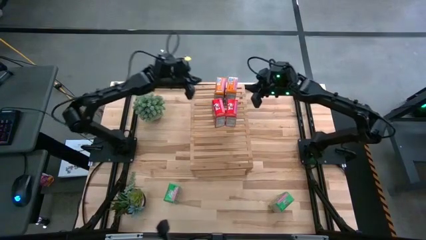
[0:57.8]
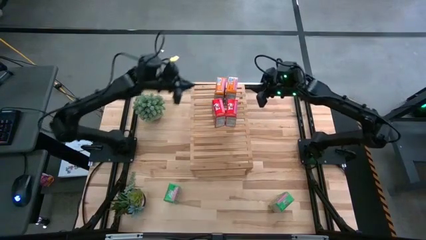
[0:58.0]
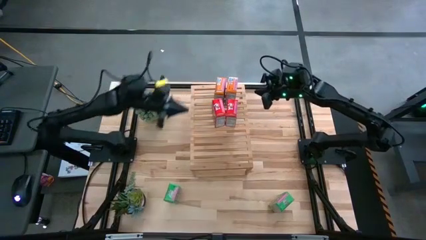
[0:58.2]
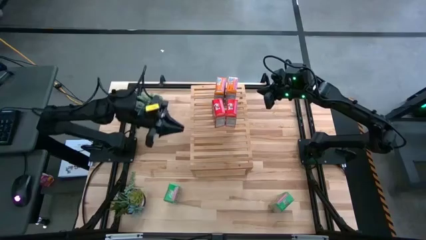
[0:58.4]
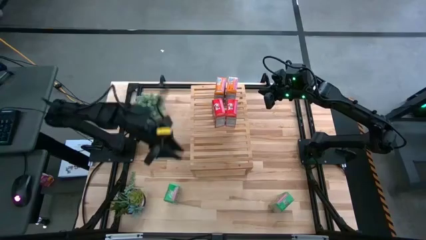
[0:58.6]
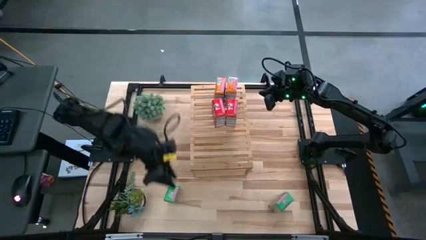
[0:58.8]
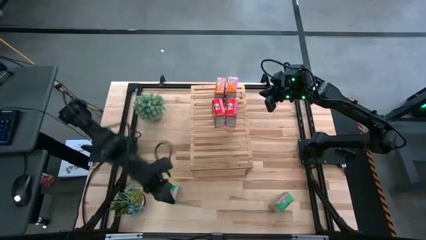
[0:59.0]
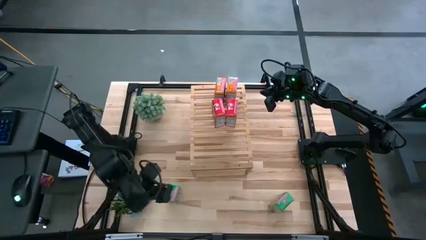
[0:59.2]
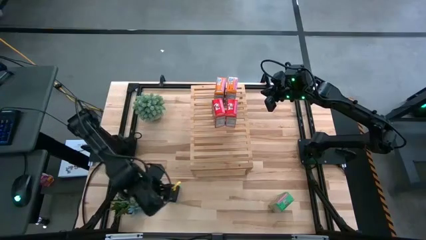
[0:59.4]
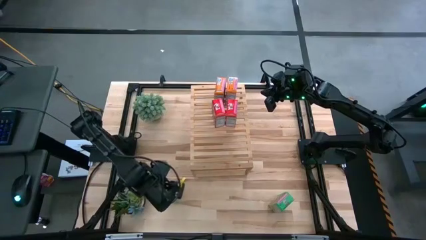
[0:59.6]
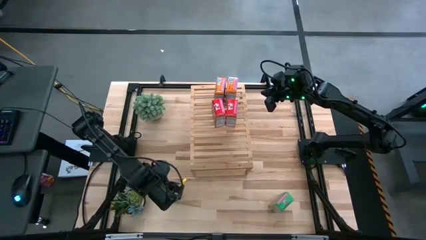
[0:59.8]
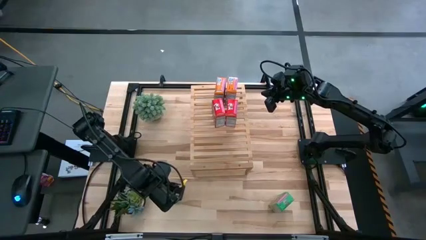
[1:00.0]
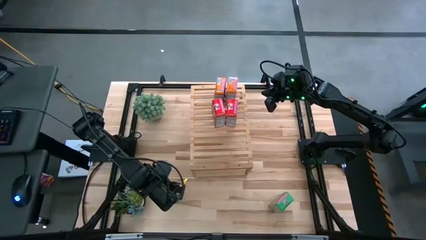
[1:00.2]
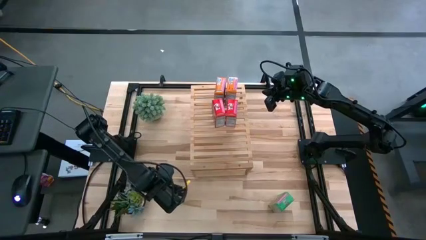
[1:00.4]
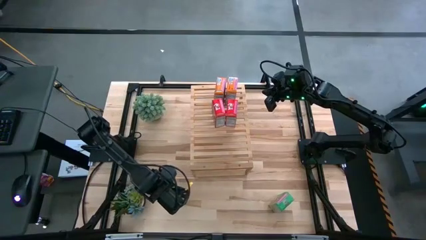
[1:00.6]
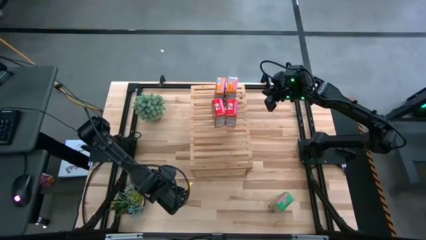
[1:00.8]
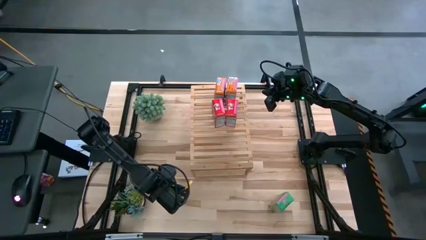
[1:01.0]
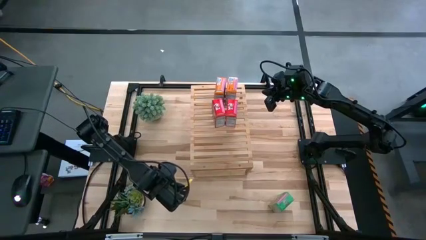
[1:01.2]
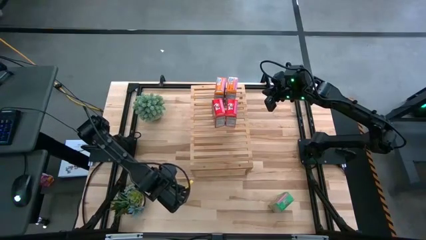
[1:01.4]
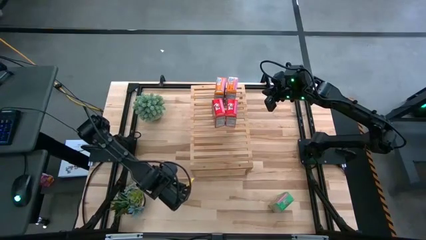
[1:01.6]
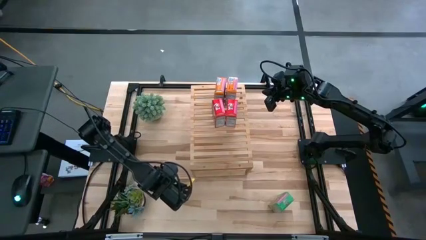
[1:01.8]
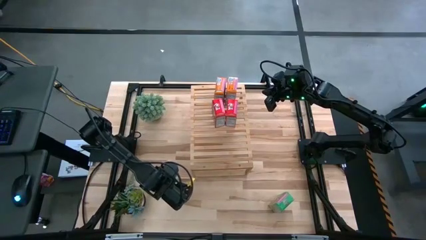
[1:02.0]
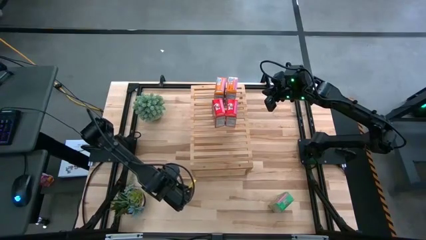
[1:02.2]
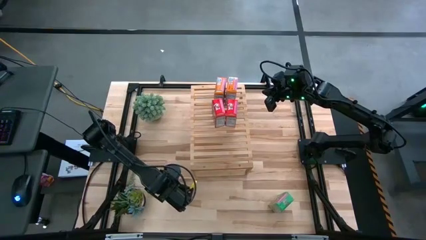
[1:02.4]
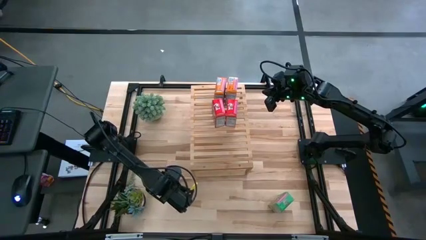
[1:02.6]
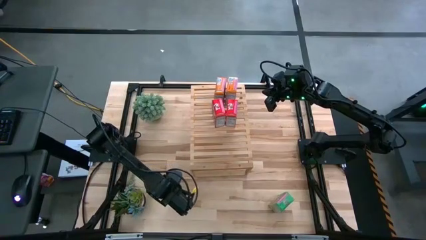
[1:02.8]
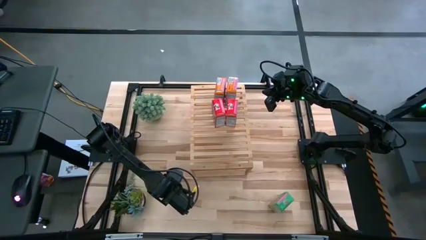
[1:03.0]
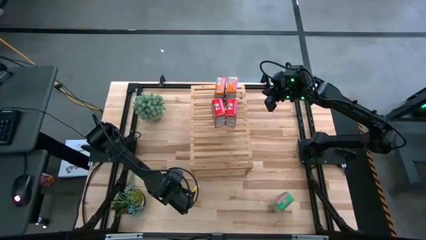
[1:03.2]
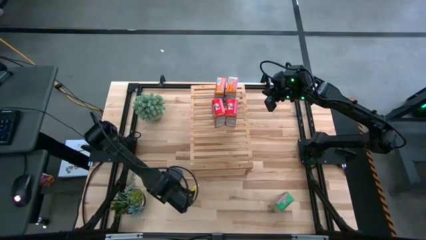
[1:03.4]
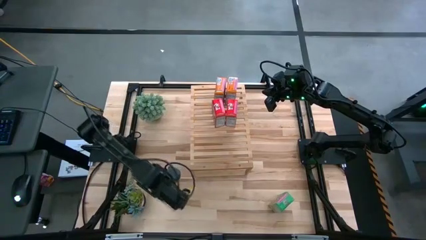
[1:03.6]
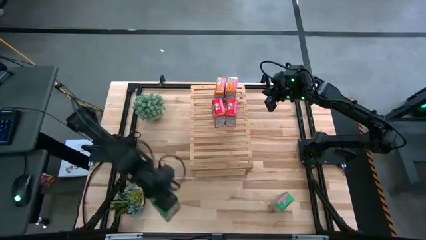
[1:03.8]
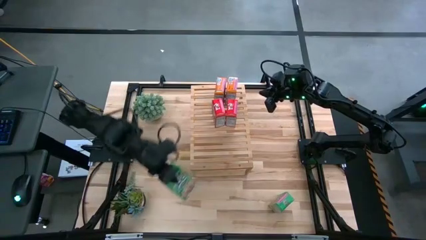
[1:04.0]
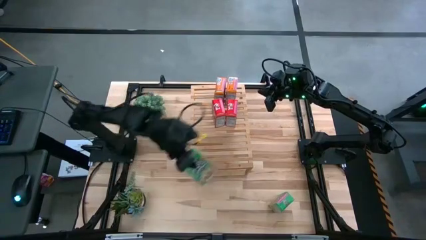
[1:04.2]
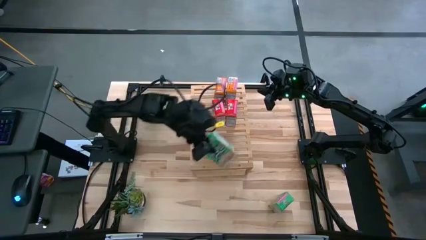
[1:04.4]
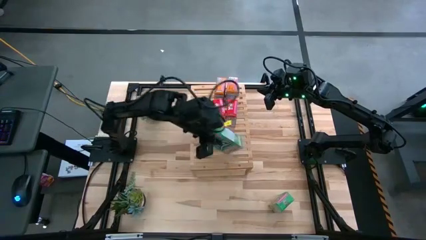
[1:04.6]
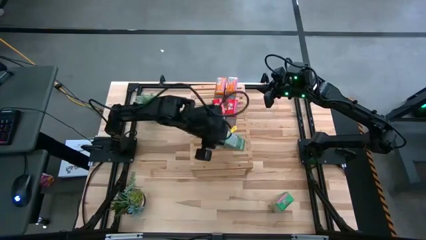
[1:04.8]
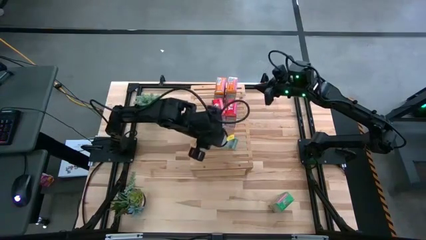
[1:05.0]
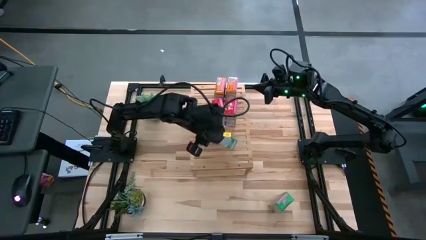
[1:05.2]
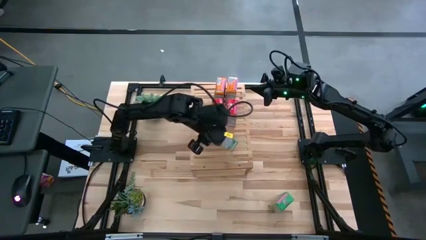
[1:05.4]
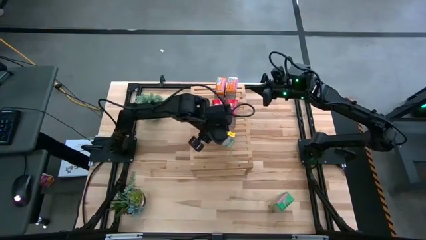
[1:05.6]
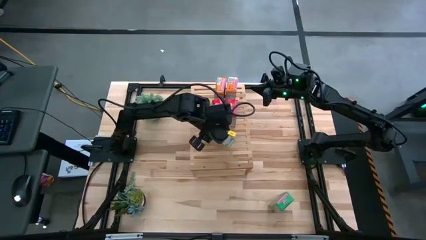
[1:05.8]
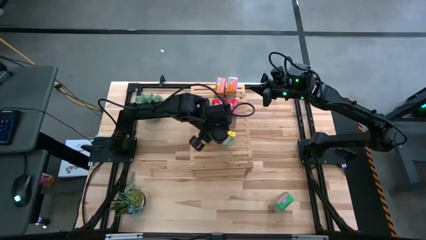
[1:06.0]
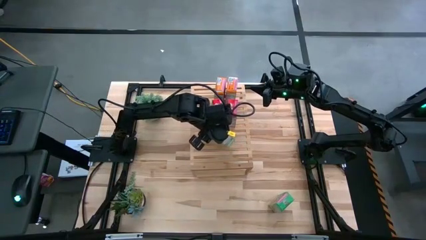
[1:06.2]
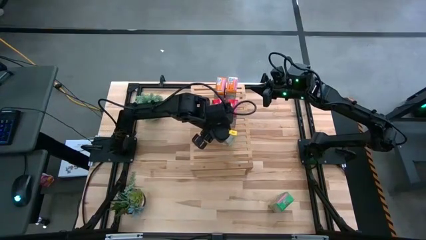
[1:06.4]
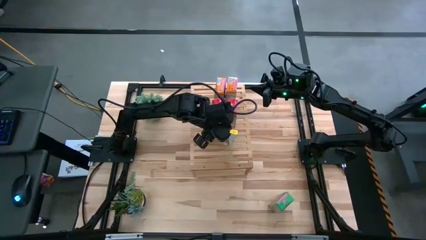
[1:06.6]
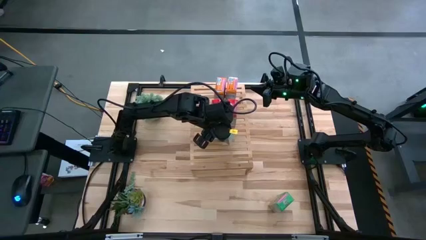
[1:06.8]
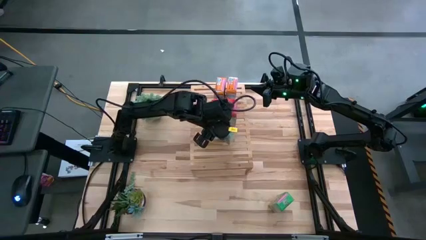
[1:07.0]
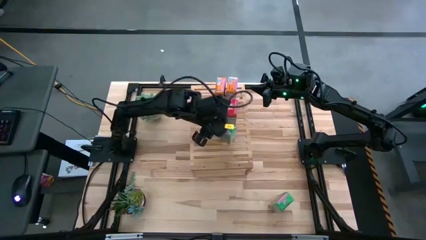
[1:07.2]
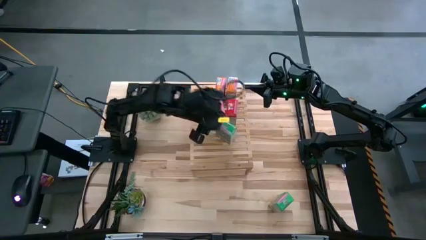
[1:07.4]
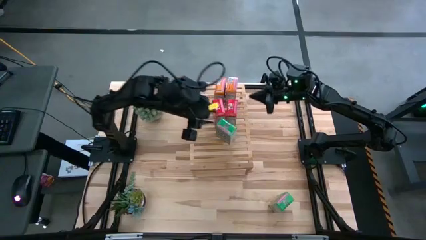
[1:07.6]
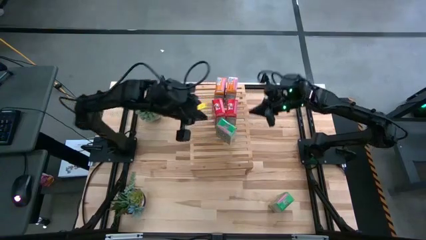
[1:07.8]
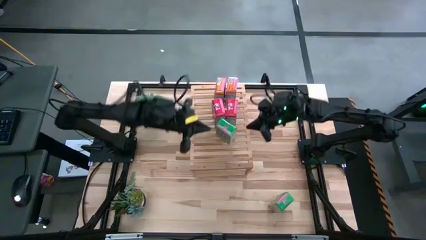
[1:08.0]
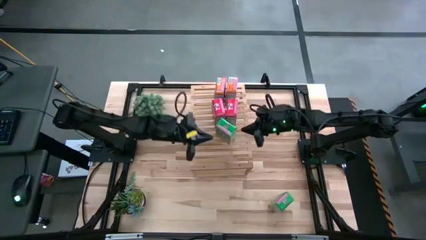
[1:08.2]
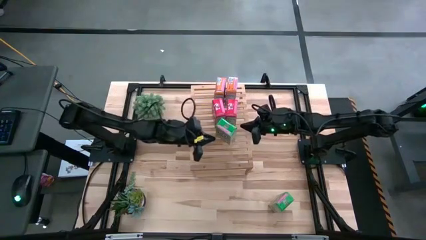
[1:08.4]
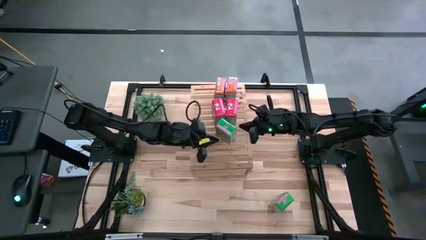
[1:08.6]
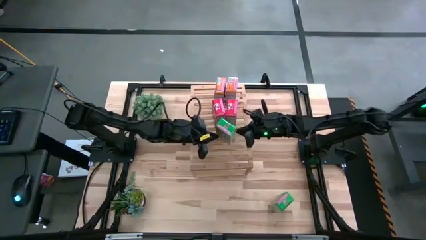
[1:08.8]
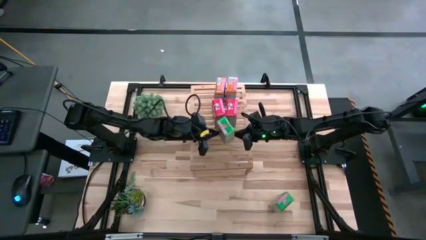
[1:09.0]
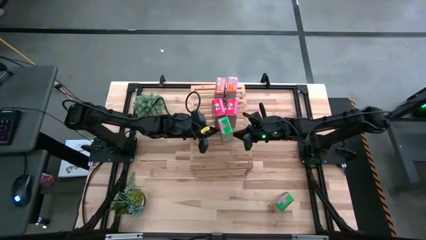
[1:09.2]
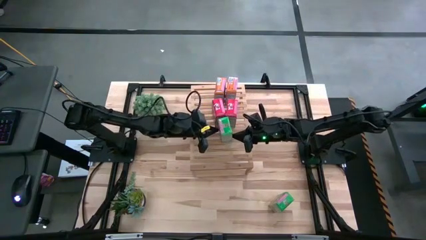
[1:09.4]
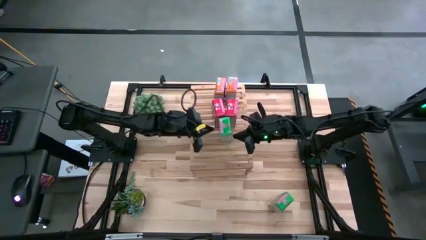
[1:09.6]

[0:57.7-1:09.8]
Task: Stack cereal on shelf
Put the left green cereal box on the shelf
